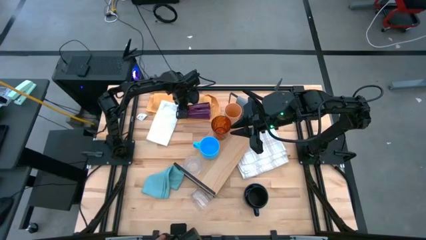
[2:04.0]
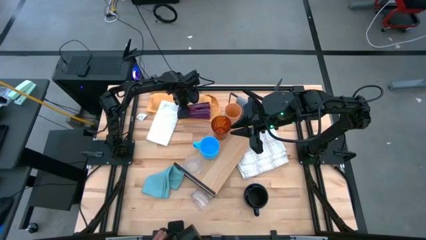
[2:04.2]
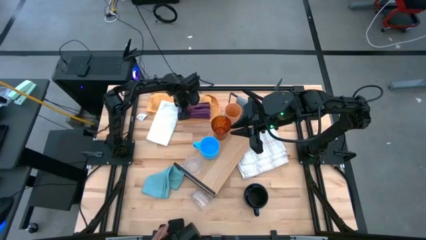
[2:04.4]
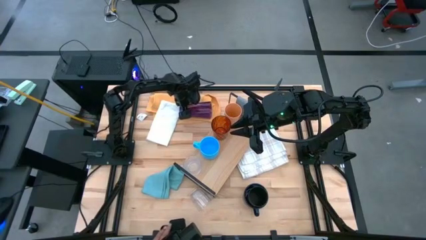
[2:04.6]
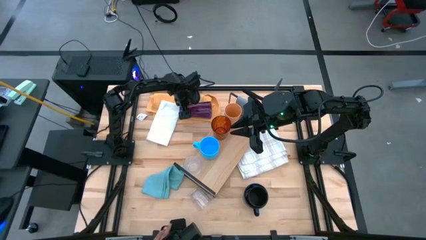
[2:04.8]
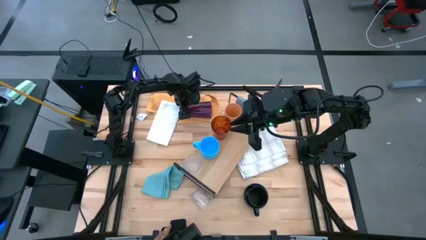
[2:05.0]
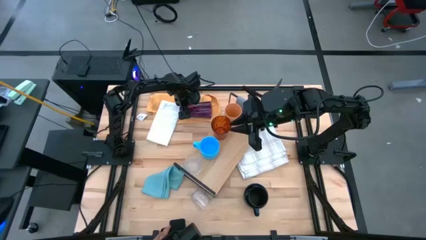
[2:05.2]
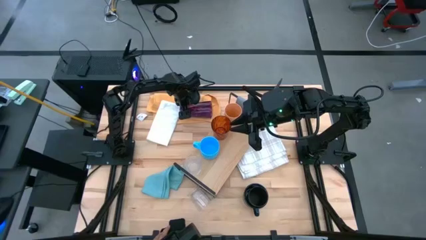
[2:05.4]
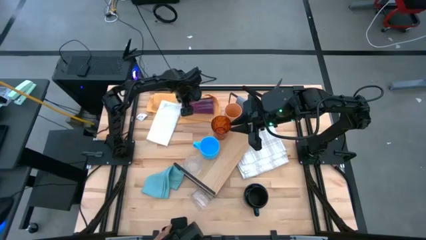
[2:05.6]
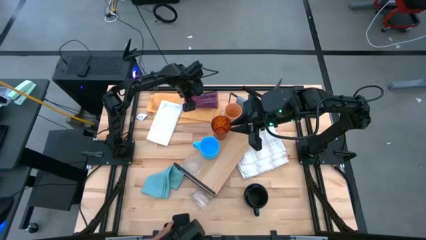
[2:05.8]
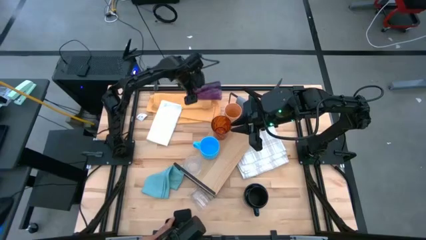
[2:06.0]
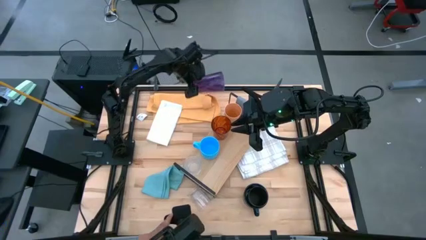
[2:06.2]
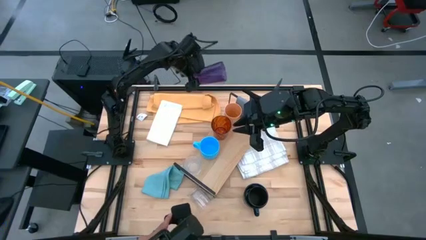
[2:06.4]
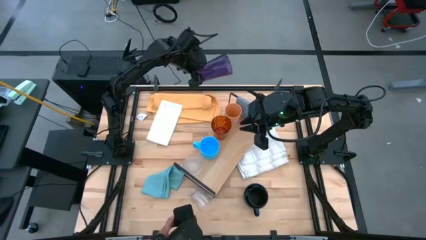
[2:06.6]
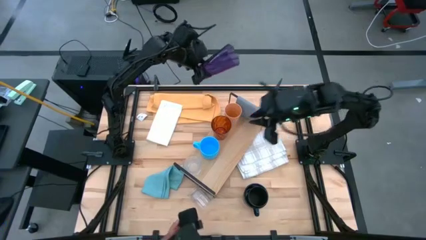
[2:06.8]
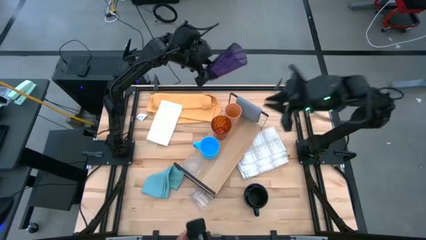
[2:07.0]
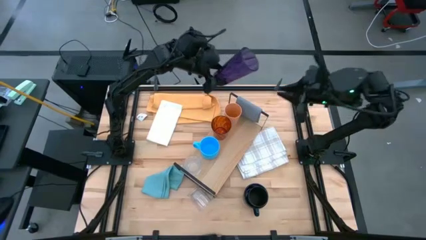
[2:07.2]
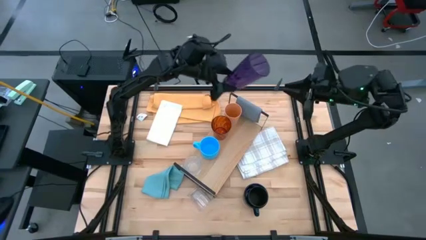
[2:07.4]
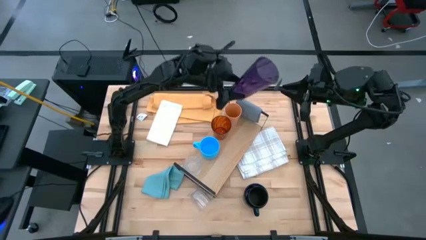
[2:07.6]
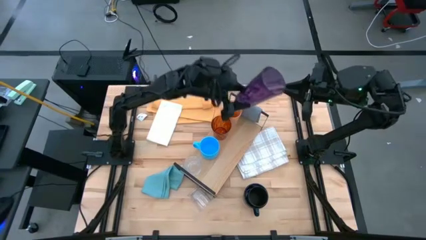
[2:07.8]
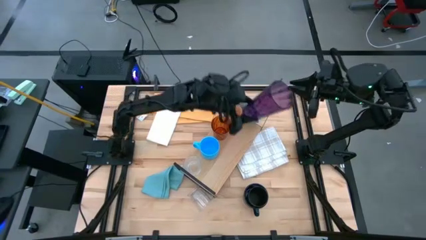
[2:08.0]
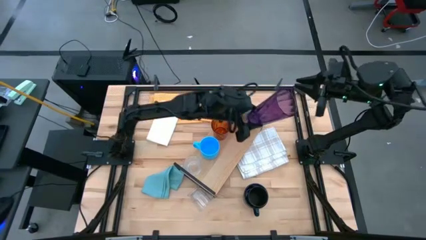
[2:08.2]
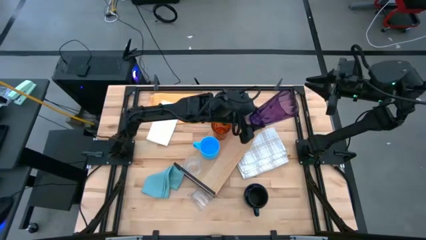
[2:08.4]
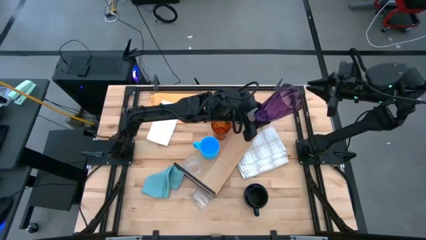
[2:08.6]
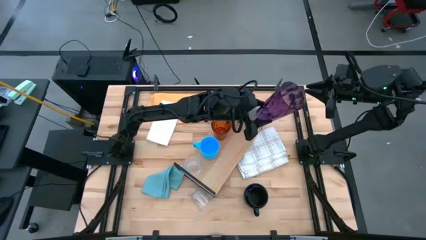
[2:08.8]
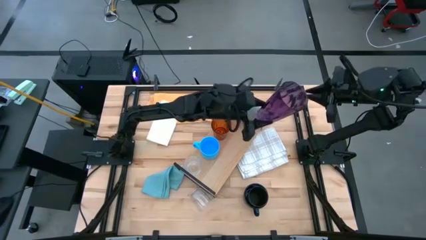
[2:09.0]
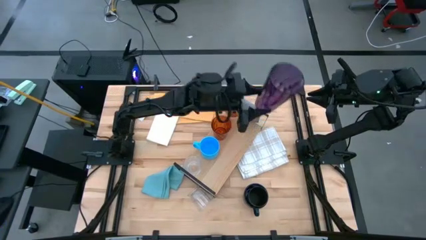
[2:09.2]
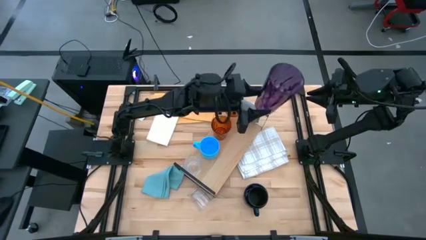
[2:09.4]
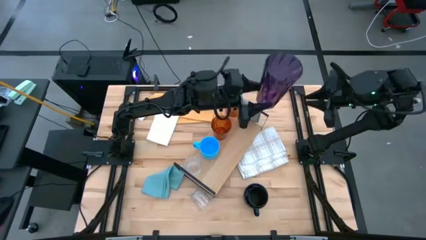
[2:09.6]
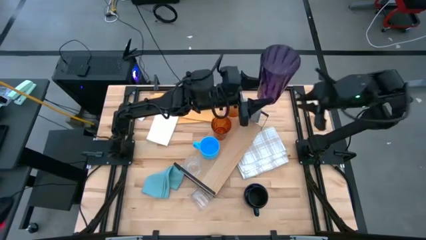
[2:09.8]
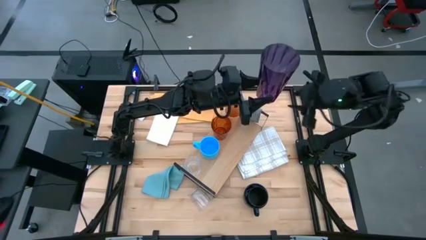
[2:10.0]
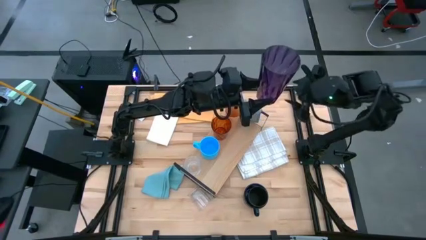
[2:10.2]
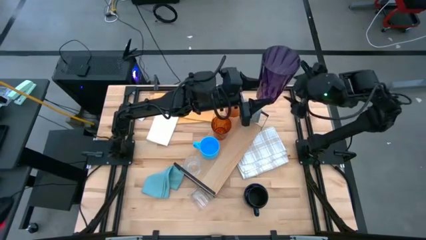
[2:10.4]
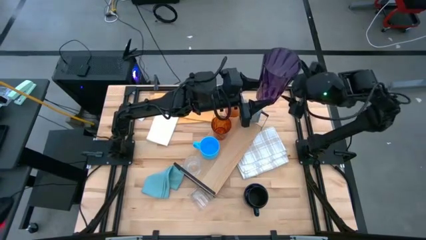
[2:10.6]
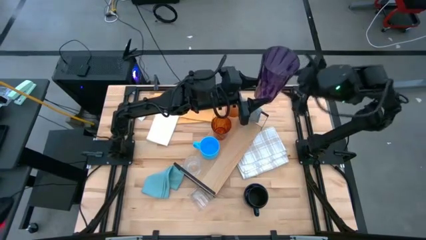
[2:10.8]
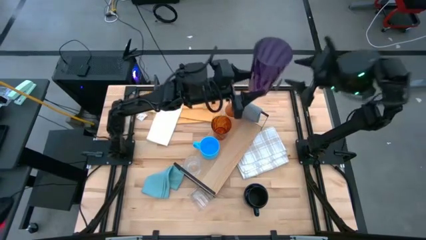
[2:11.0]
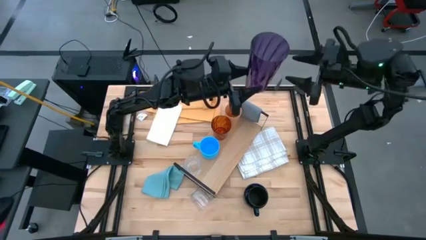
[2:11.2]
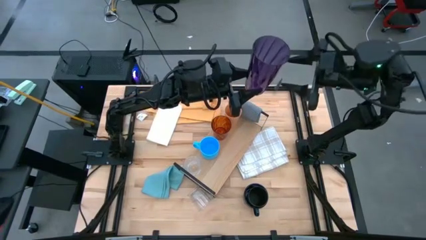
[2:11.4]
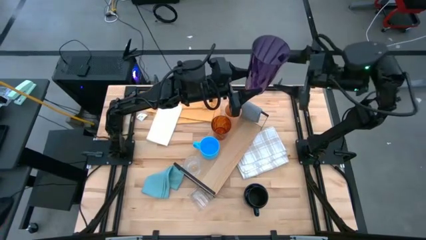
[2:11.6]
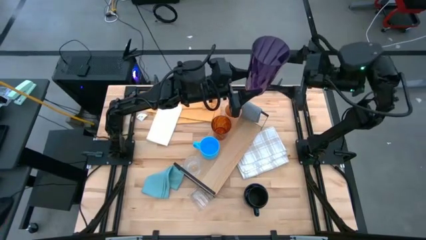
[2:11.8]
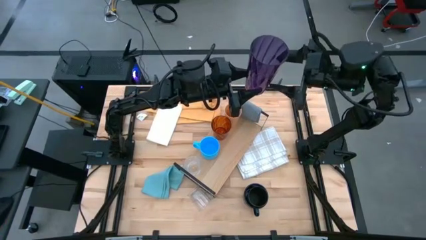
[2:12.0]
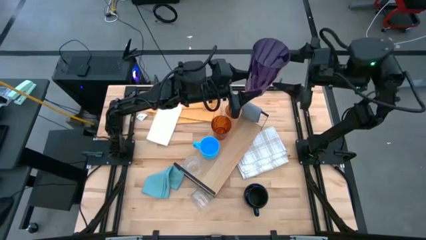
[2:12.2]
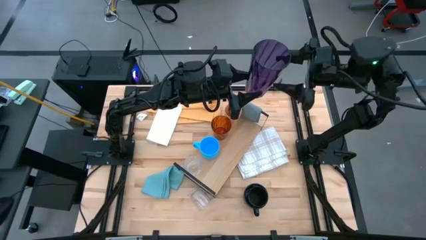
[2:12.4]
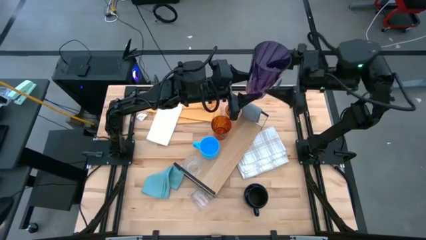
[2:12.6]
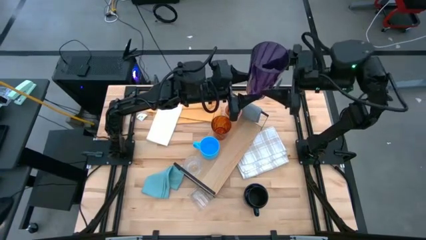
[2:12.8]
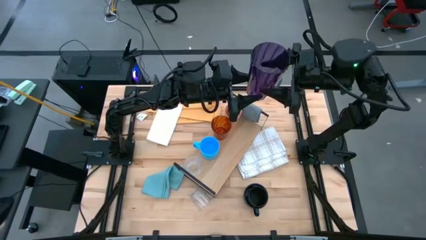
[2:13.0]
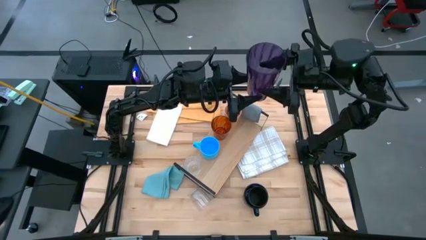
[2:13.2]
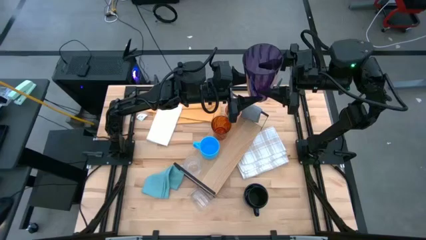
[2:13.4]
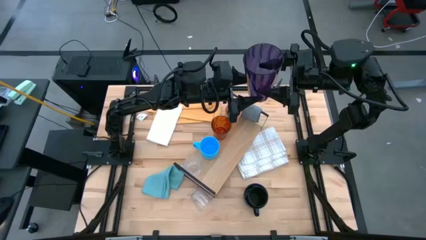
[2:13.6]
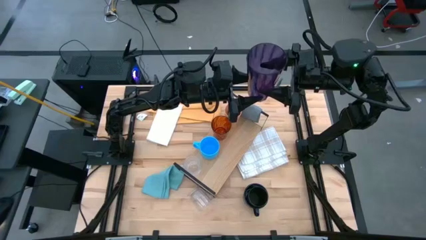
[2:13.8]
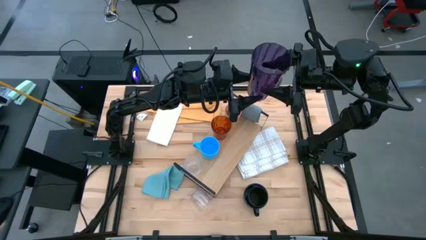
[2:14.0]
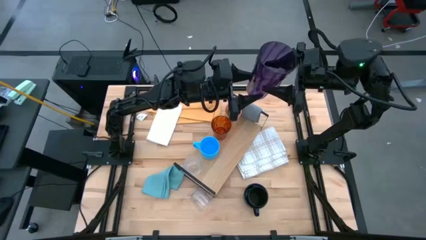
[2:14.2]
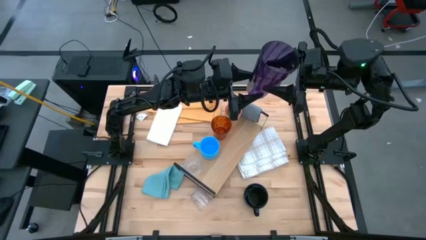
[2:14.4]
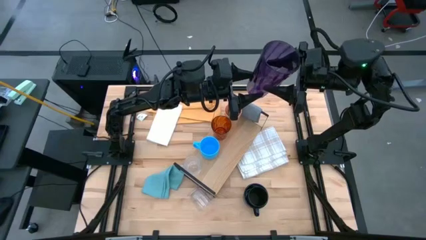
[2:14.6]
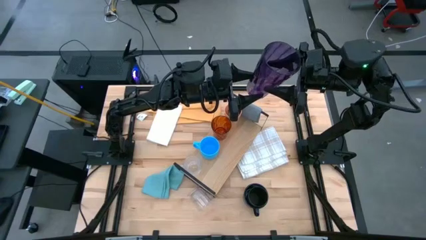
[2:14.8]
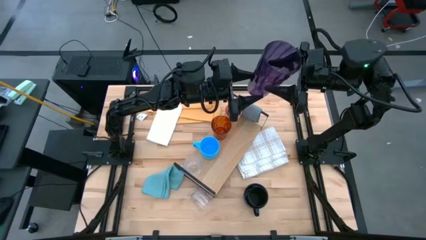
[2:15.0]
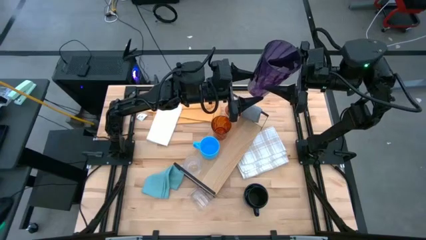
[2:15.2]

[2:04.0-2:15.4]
Task: Stack small to large cups/mugs on shelf
Put the violet glass on the shelf

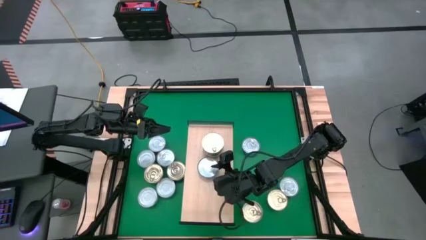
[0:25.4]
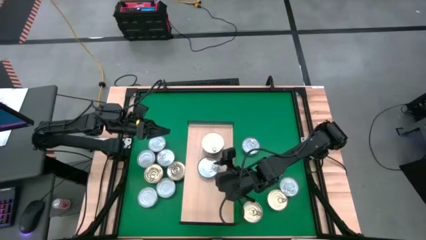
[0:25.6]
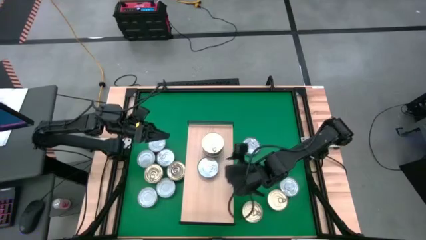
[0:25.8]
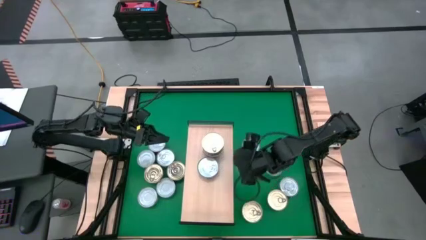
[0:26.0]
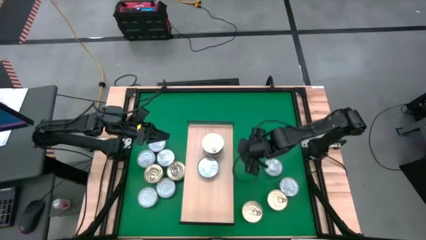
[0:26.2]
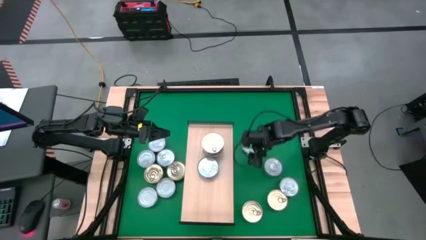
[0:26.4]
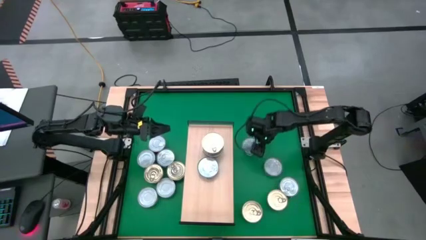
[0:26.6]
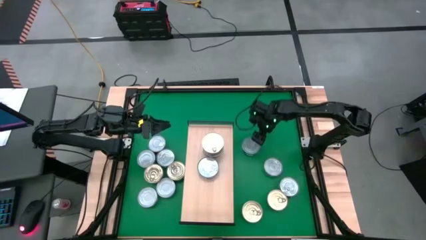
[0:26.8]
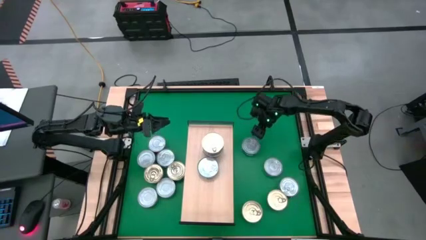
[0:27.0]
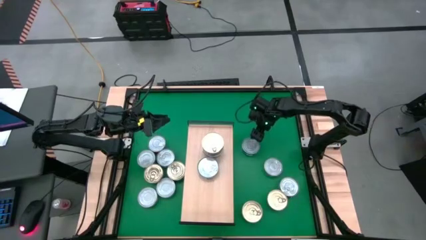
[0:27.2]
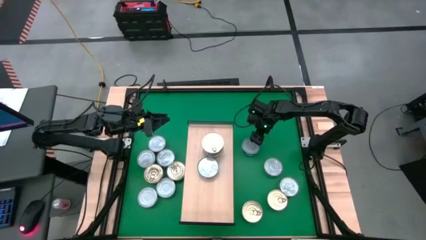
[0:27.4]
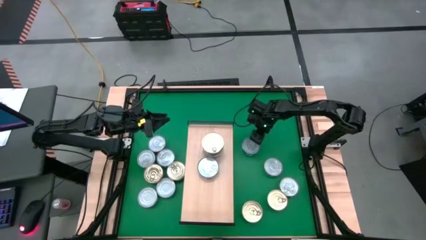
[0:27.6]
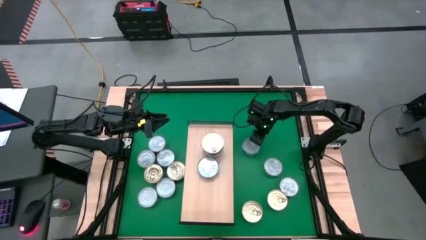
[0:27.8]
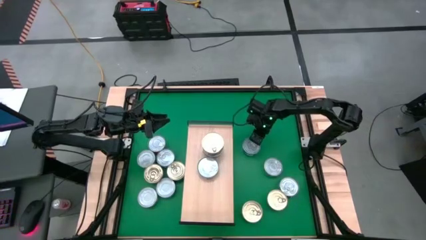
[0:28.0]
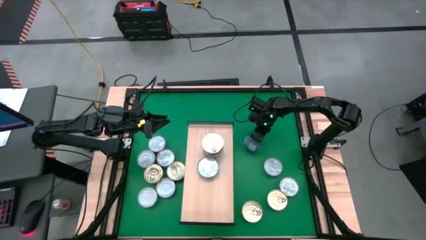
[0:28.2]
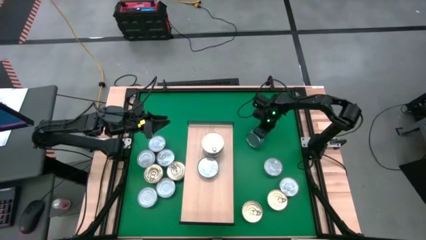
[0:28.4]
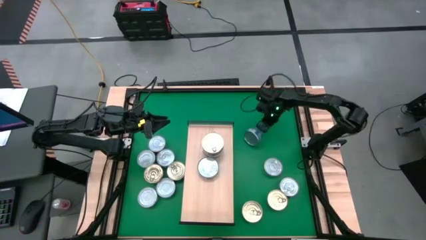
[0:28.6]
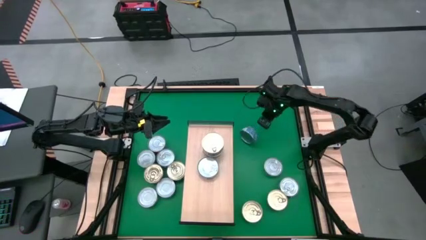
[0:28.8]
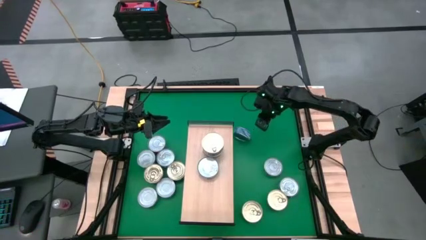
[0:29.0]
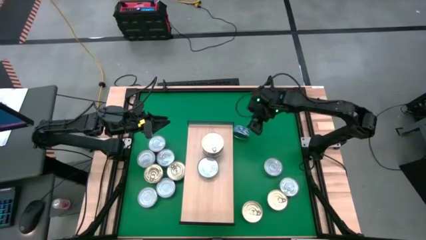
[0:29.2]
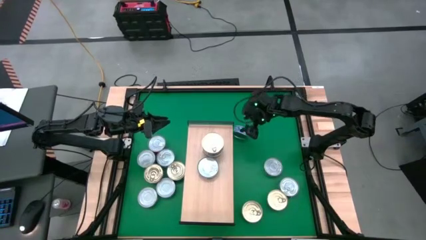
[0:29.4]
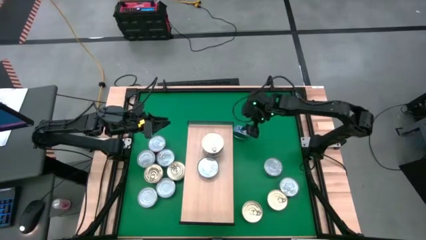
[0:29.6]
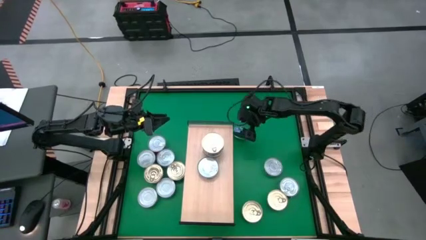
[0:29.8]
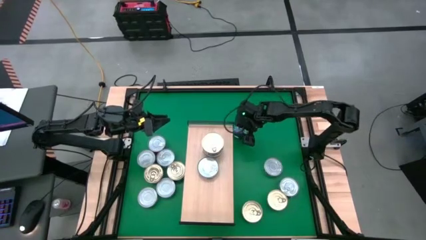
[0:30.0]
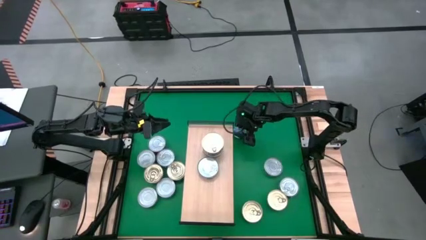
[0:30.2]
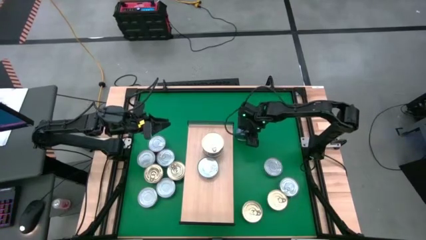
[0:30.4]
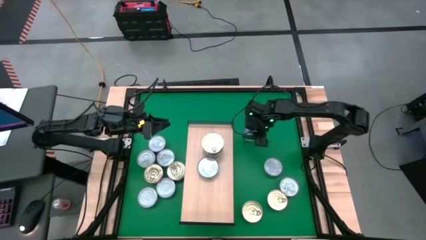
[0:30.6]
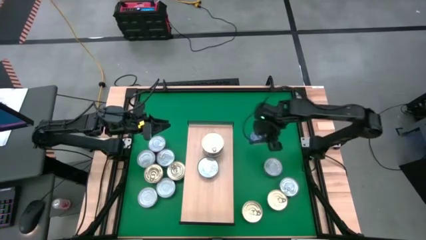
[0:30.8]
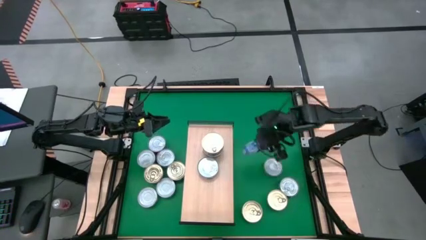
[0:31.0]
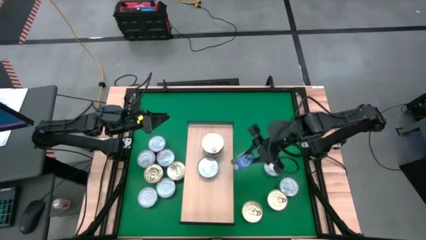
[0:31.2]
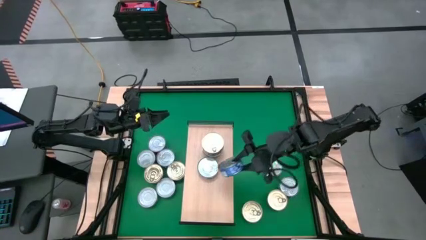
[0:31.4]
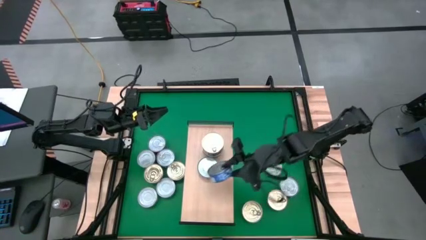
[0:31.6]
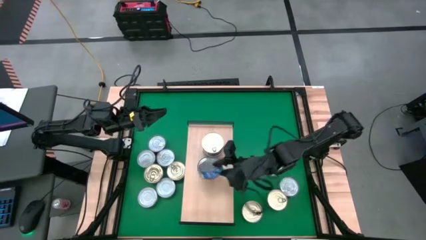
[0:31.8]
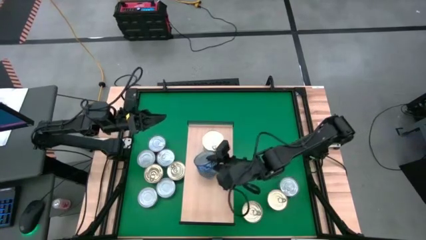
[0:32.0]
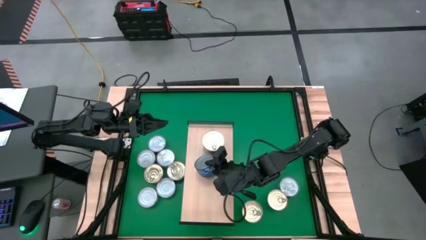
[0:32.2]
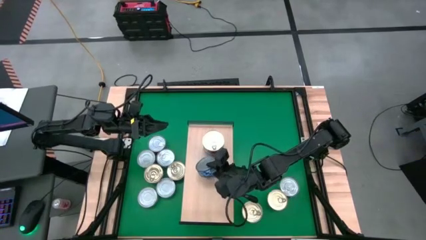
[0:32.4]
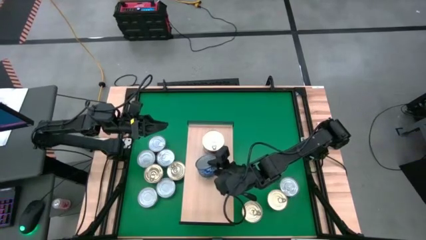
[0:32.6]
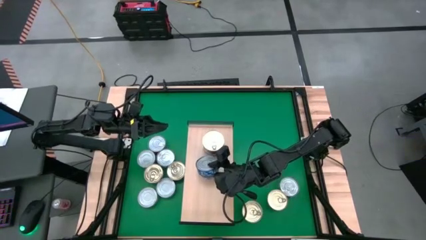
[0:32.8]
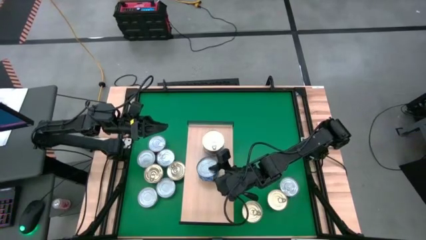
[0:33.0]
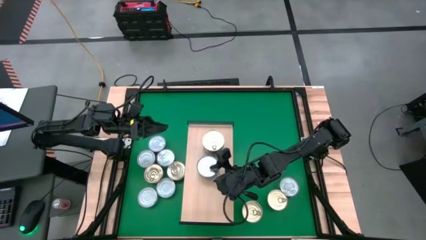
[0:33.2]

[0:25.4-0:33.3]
Task: Stack canned seafood by type on shelf
Stack the blue tuna can on top of the other blue tuna can on the shelf
